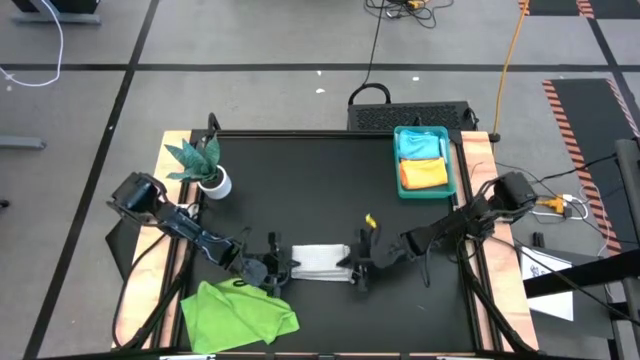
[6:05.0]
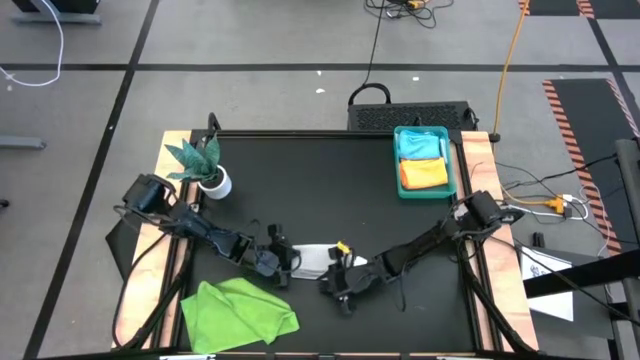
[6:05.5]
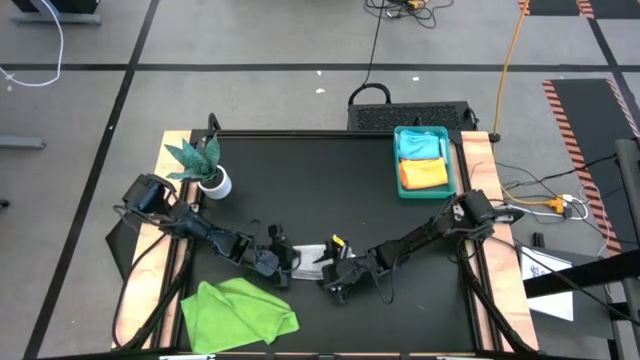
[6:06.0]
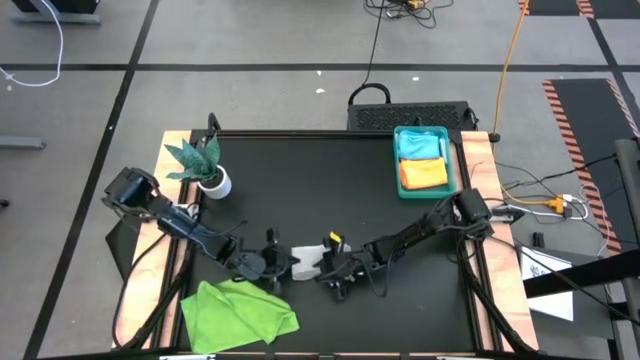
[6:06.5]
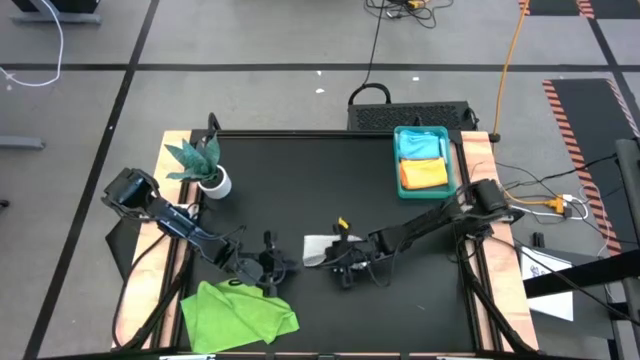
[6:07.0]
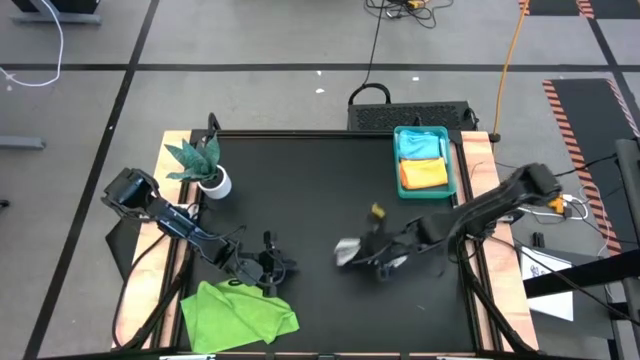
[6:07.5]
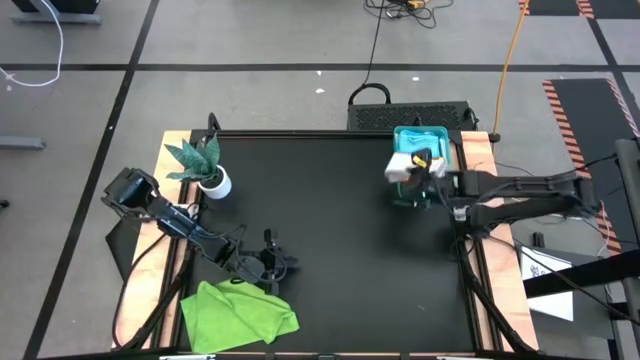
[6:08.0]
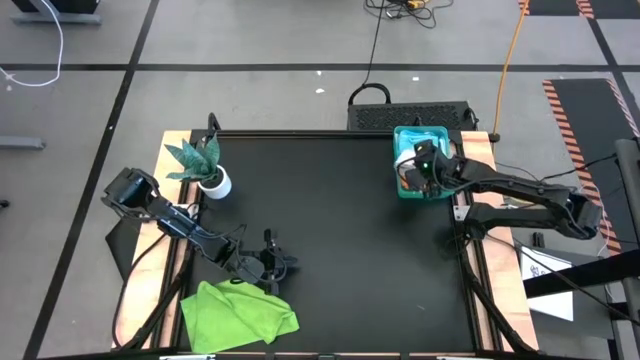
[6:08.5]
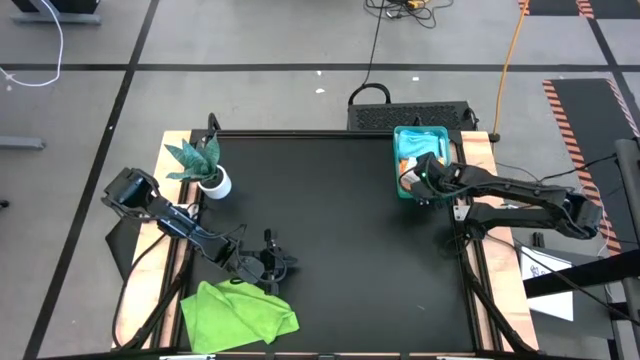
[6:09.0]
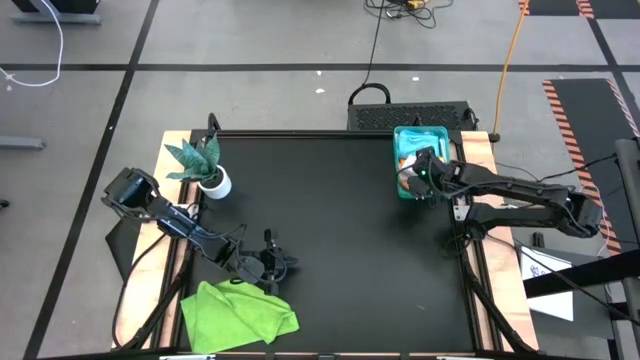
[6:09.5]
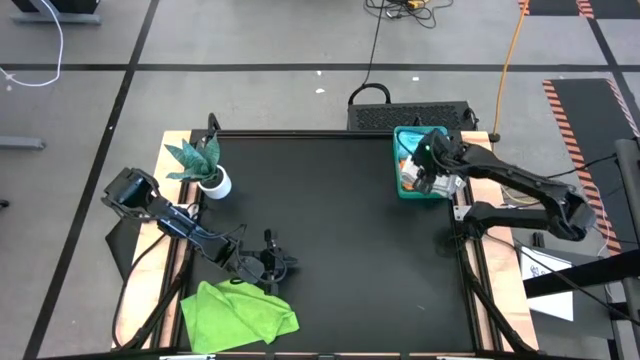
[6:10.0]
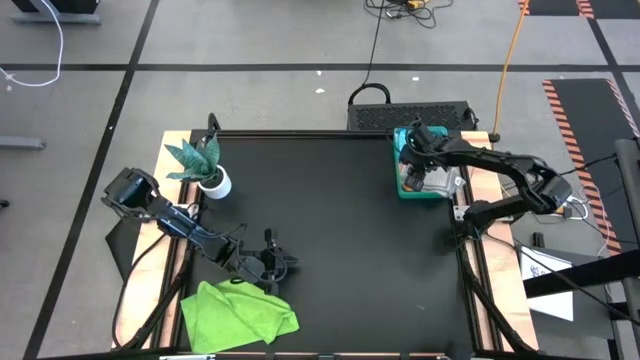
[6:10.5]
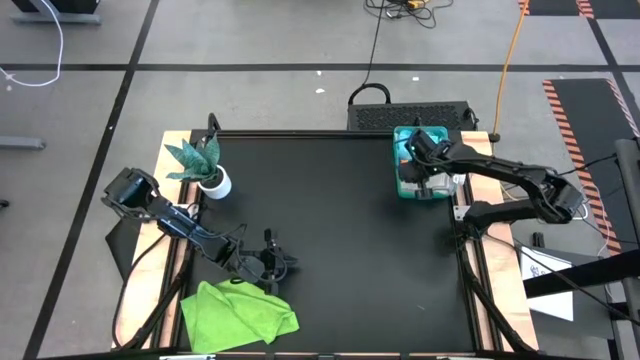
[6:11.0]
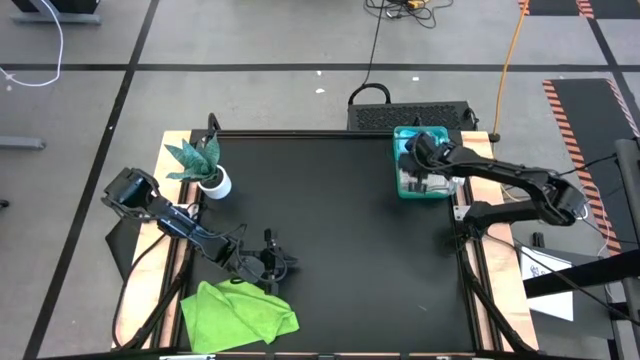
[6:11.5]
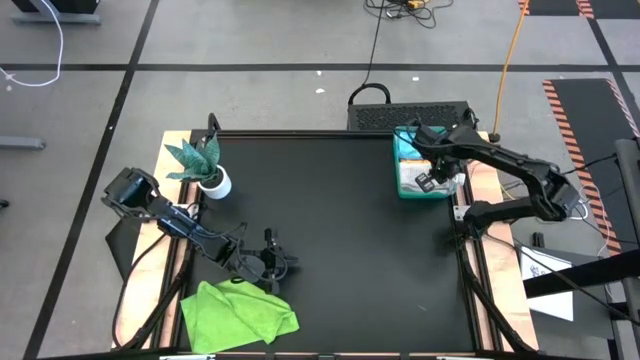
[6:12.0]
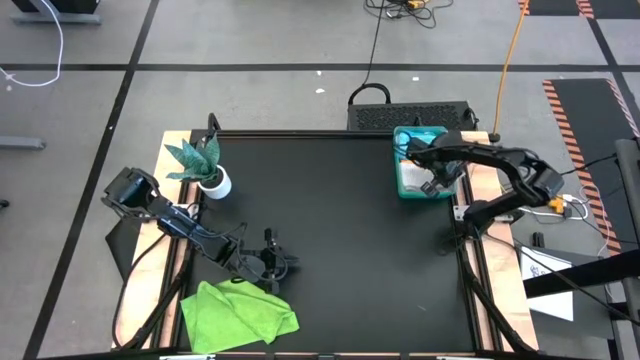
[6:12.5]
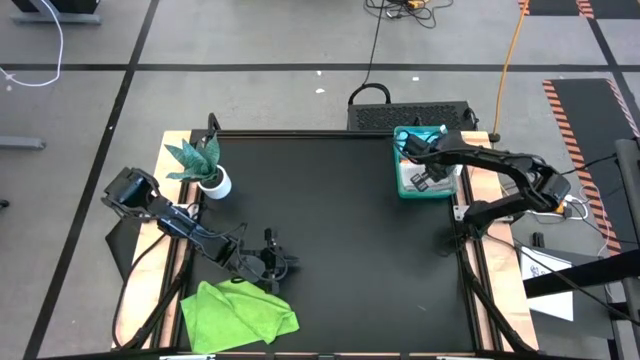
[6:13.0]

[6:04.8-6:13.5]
Task: Fold microfiber towels
Stack the gray microfiber cloth on top of the orange microfiber cloth in the green bin

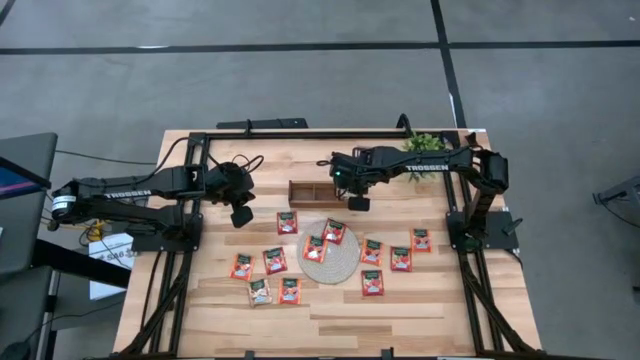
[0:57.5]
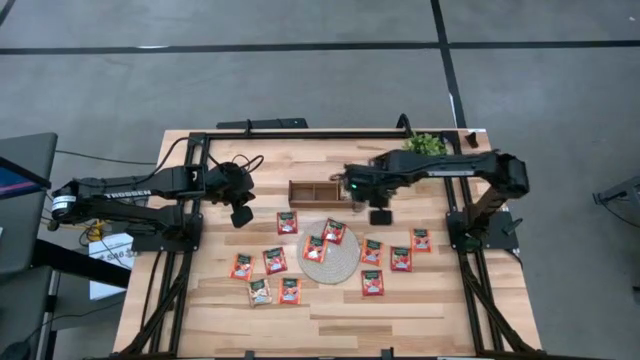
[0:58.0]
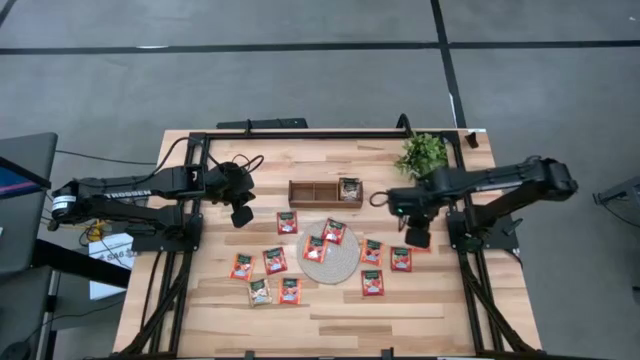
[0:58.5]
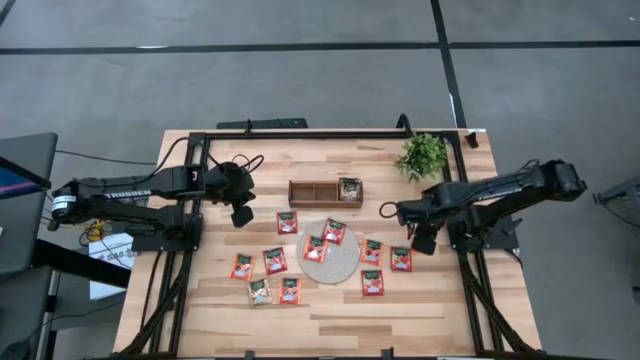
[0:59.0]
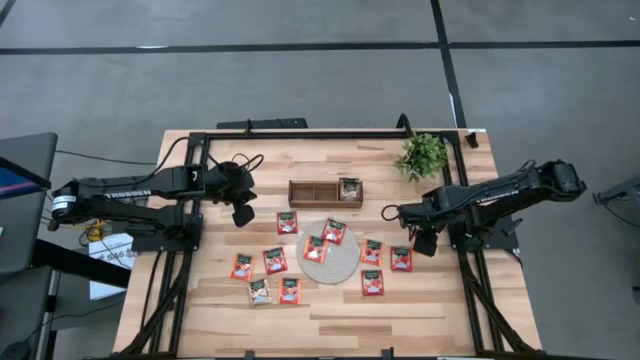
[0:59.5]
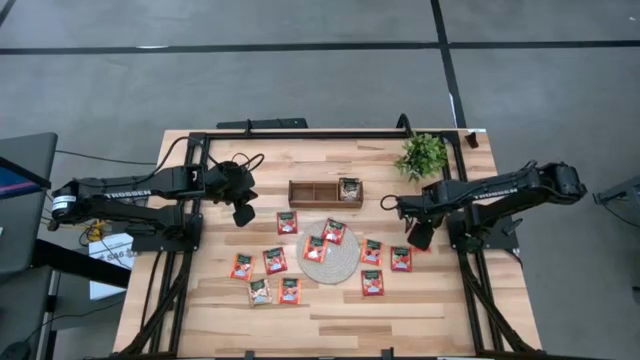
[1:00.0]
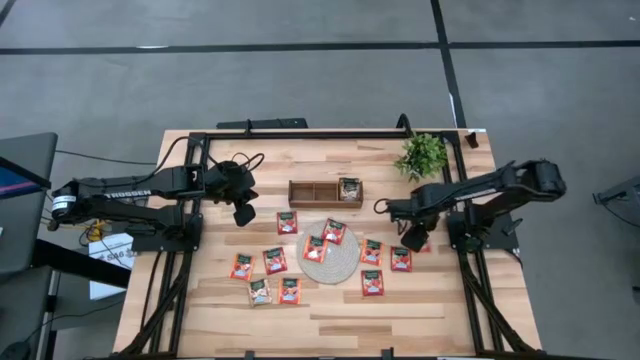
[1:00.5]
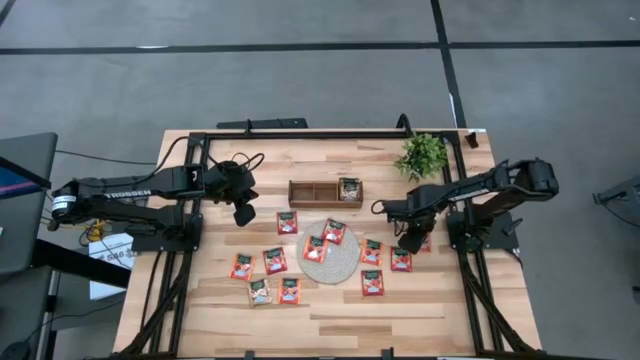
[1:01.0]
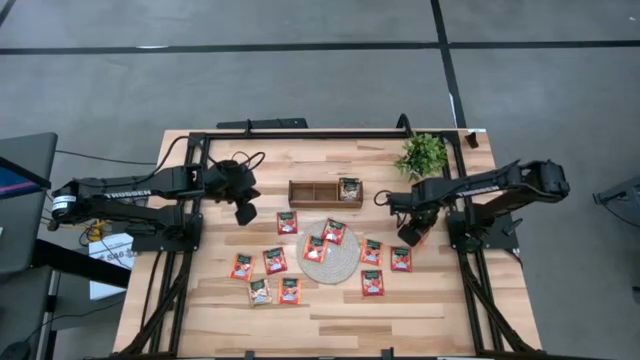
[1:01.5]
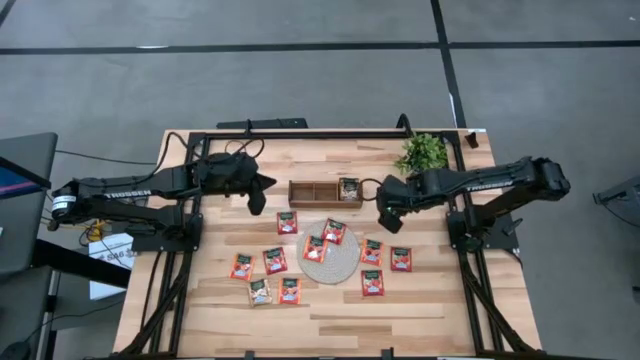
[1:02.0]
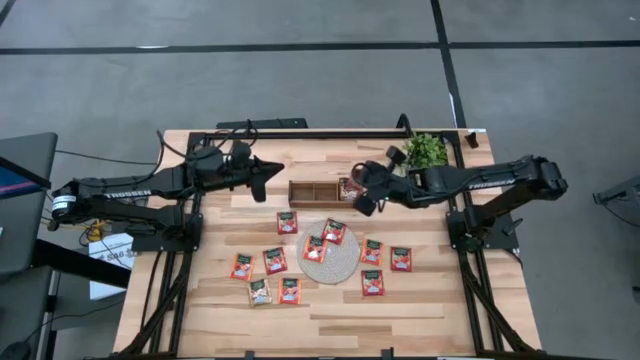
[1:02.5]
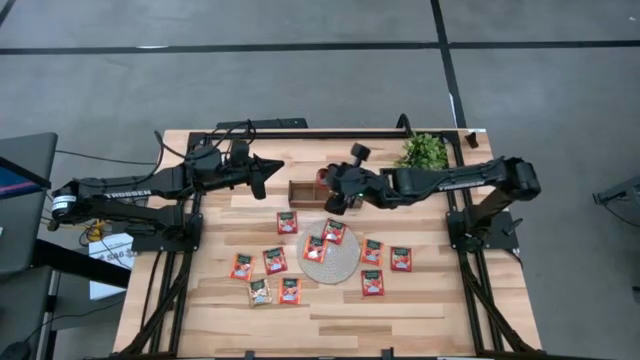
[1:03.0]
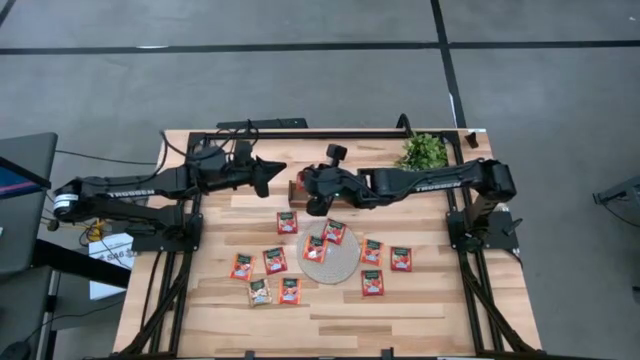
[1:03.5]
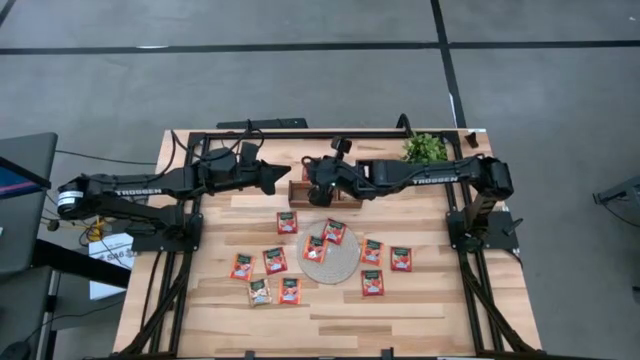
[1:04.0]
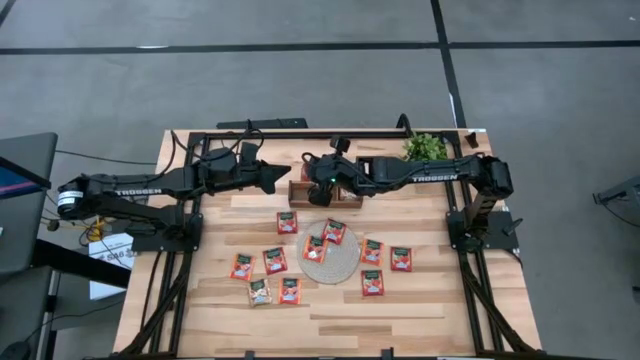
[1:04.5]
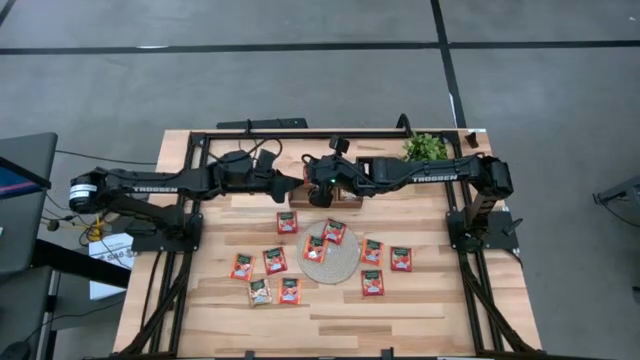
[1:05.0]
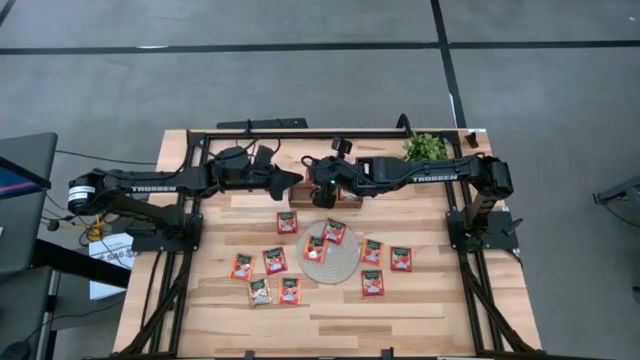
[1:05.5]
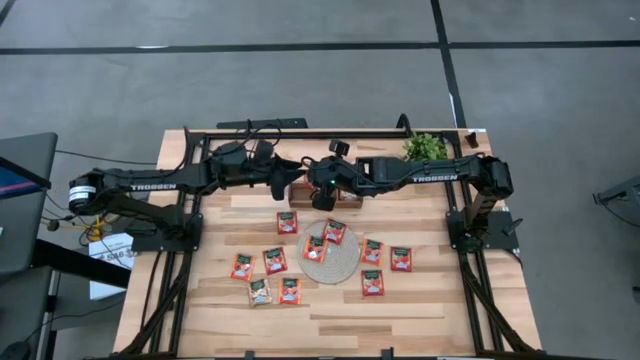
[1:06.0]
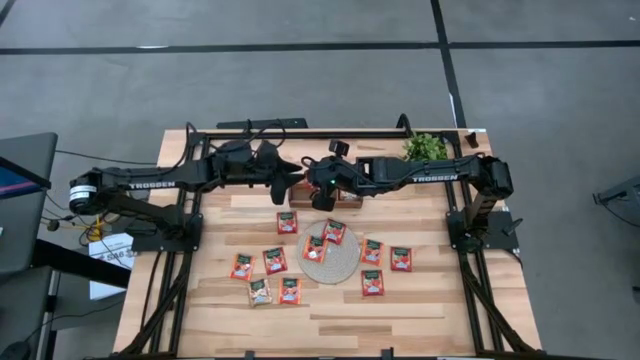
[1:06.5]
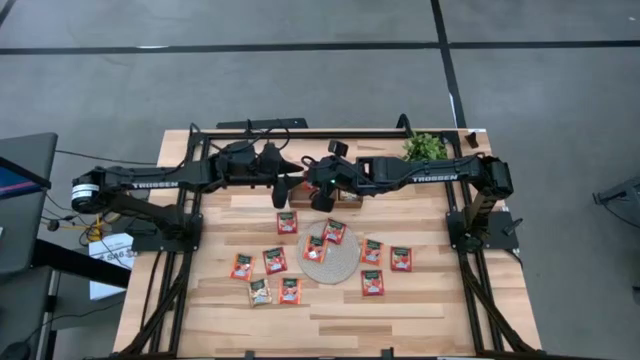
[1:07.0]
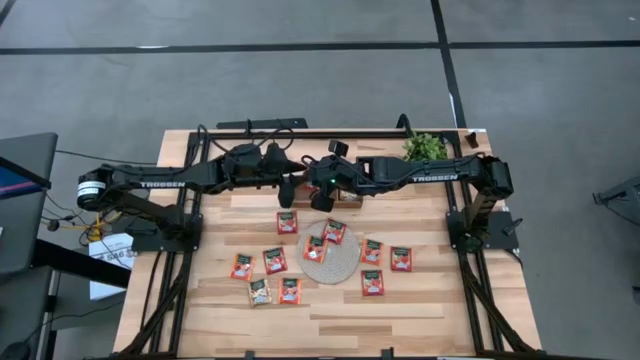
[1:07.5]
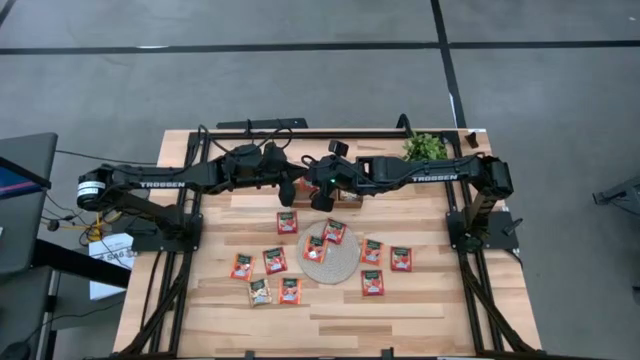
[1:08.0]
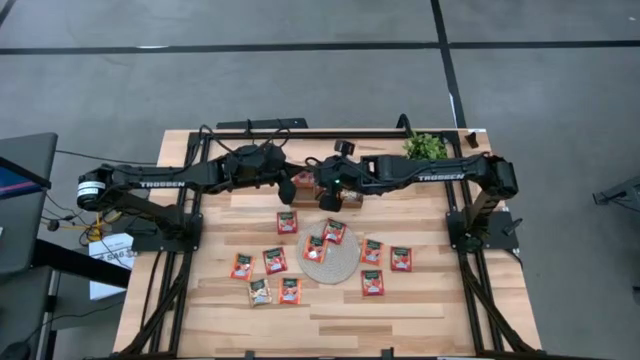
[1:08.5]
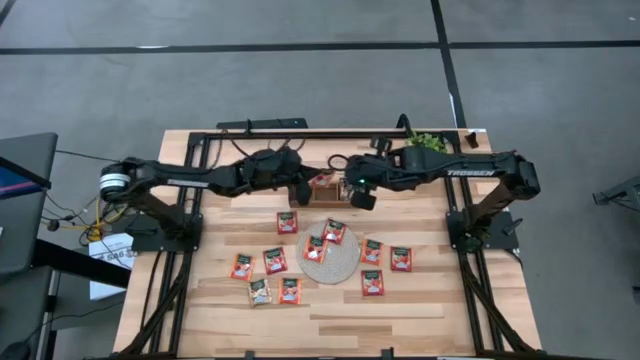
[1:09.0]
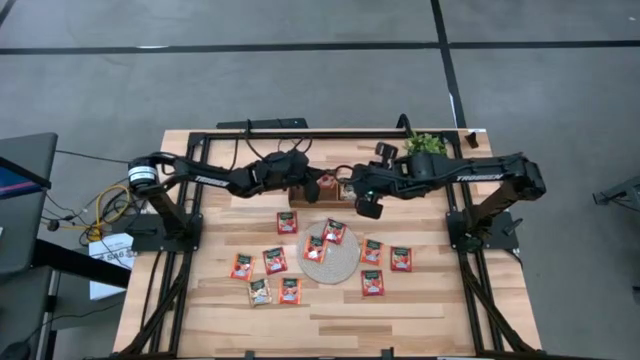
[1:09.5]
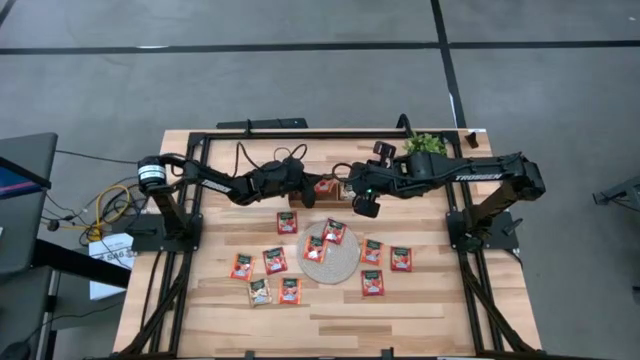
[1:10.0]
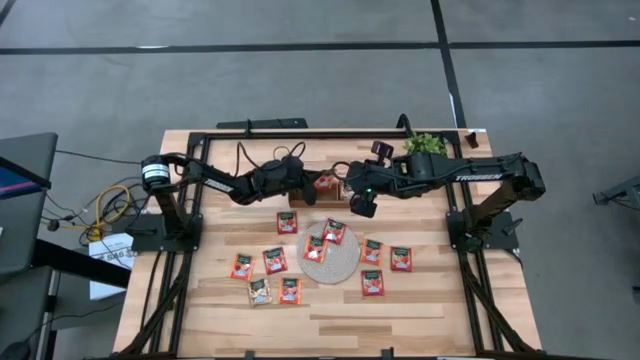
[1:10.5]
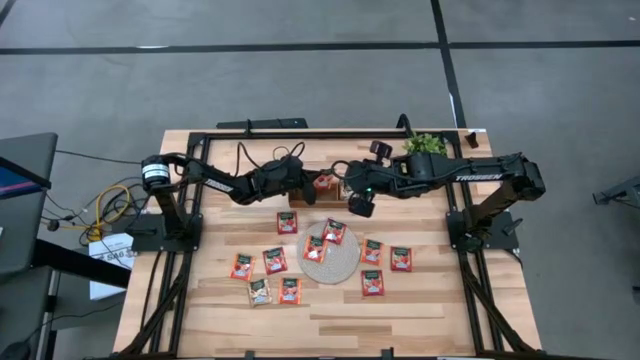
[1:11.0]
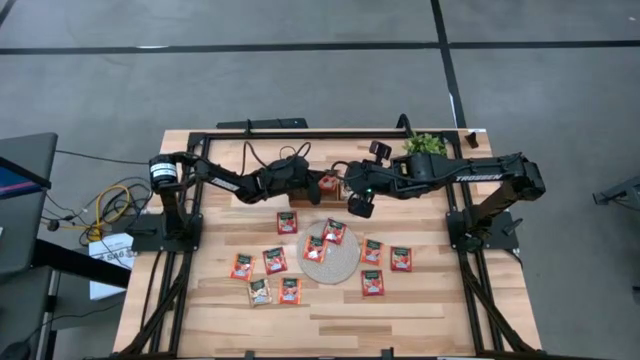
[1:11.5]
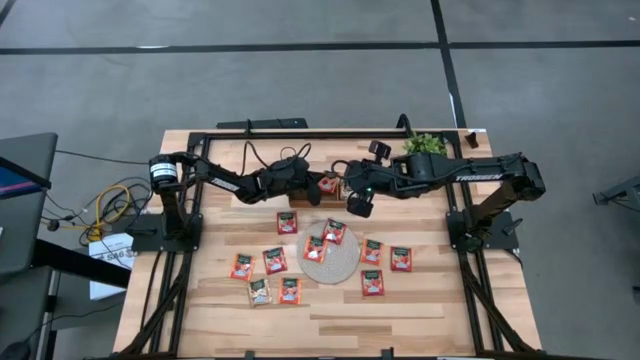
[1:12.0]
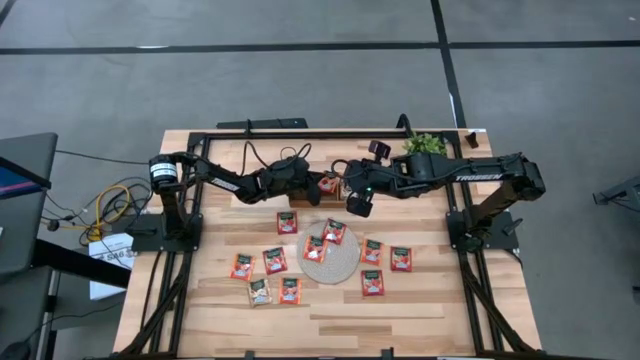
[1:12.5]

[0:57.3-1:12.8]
Task: Pick & Place Tea
Put the orange tea bag into the middle section of the wooden organizer
